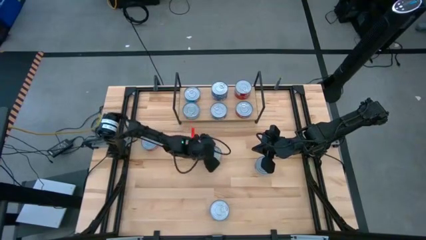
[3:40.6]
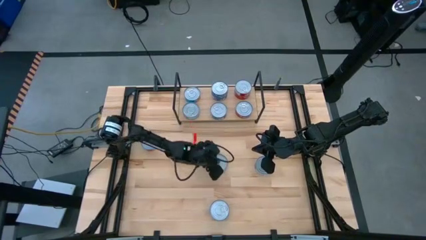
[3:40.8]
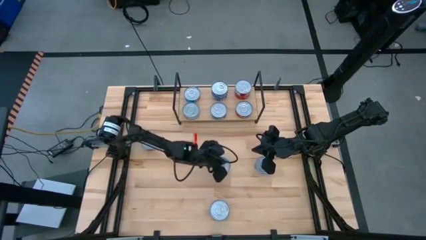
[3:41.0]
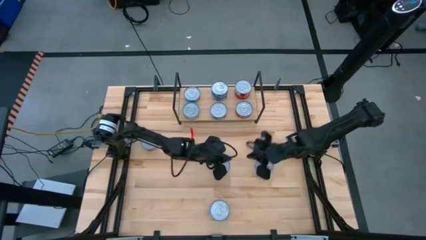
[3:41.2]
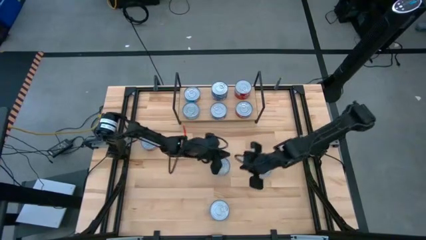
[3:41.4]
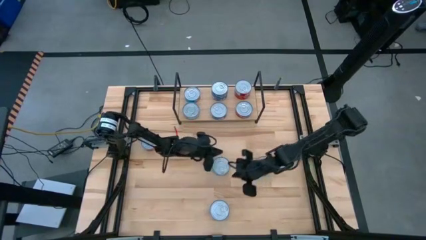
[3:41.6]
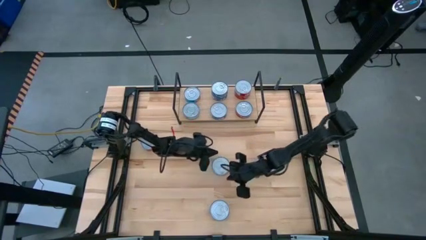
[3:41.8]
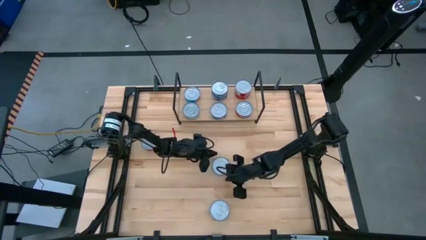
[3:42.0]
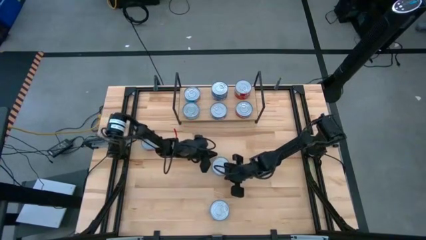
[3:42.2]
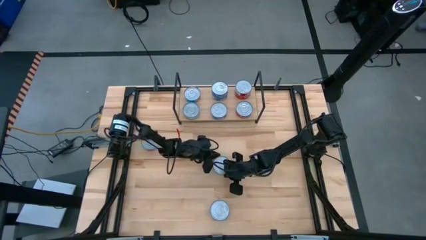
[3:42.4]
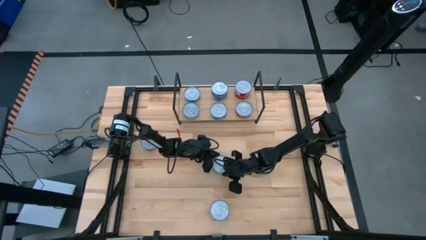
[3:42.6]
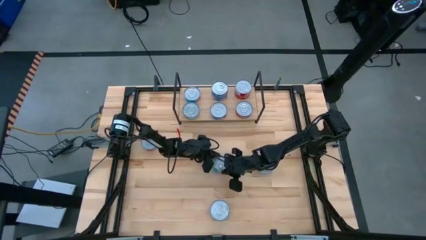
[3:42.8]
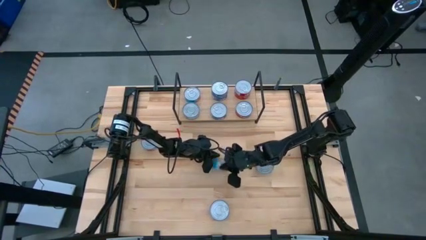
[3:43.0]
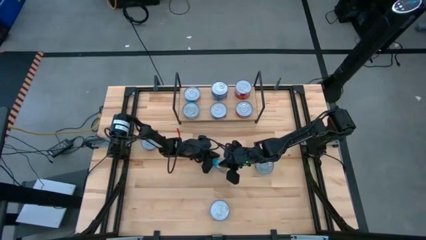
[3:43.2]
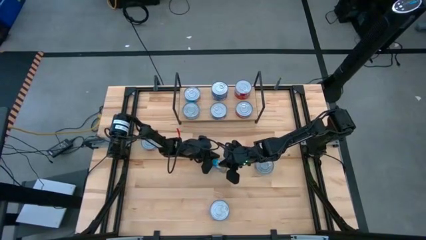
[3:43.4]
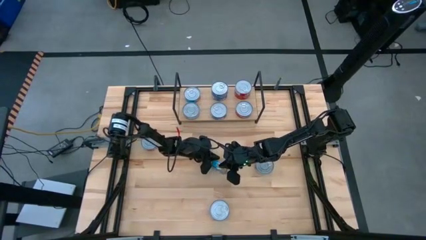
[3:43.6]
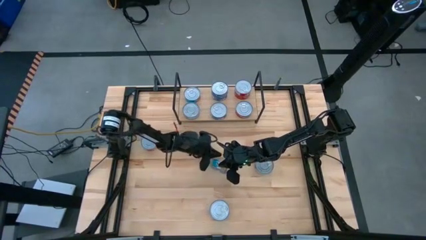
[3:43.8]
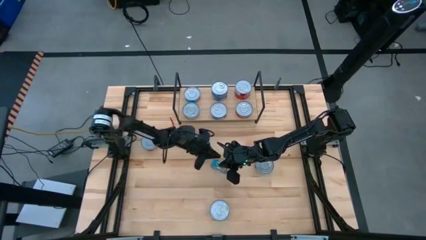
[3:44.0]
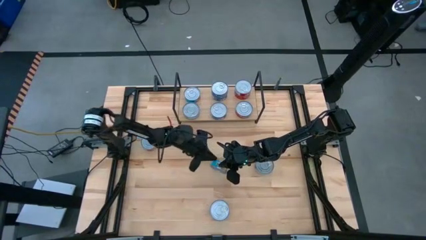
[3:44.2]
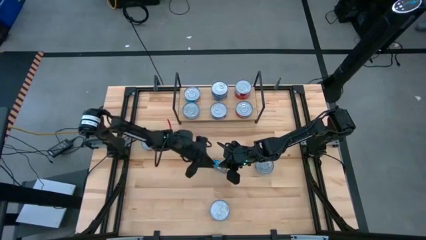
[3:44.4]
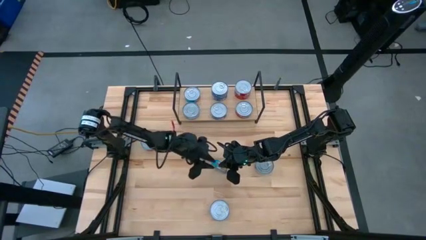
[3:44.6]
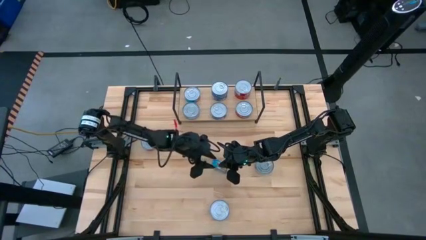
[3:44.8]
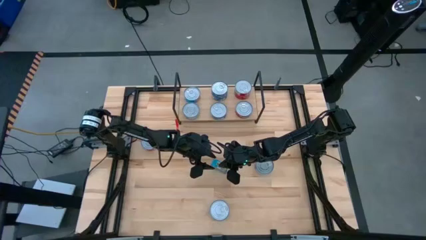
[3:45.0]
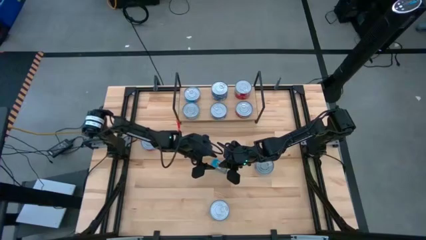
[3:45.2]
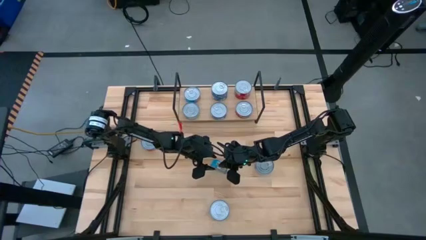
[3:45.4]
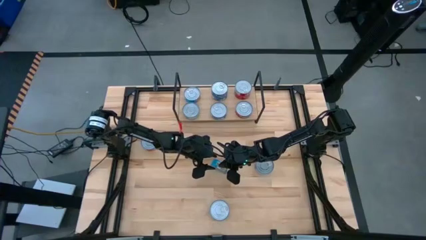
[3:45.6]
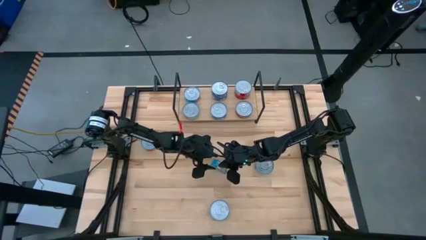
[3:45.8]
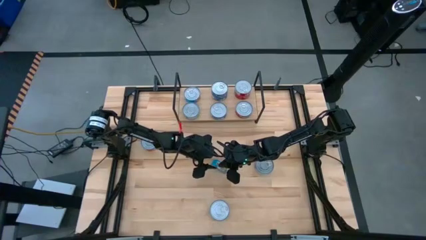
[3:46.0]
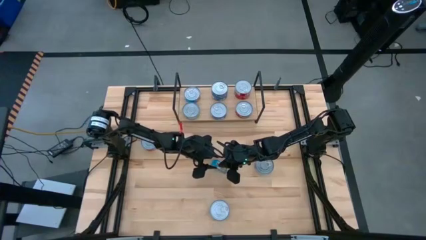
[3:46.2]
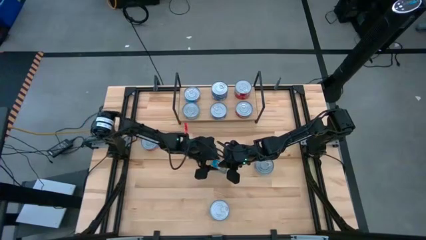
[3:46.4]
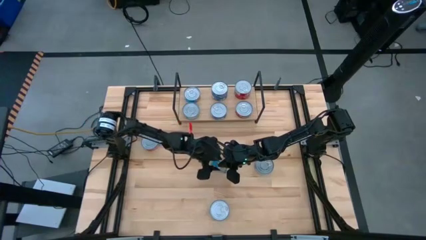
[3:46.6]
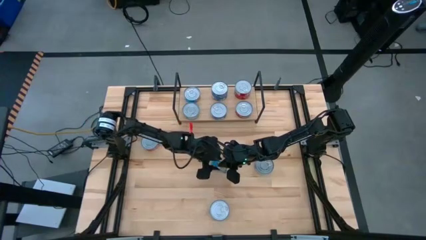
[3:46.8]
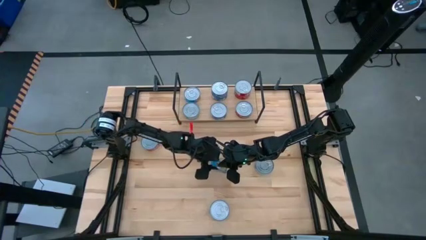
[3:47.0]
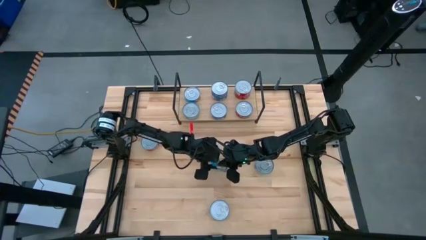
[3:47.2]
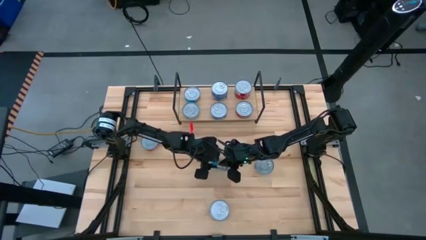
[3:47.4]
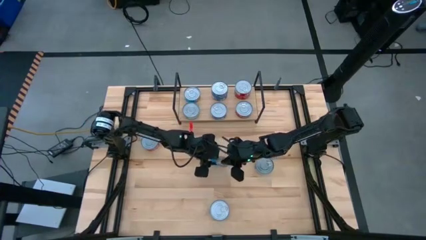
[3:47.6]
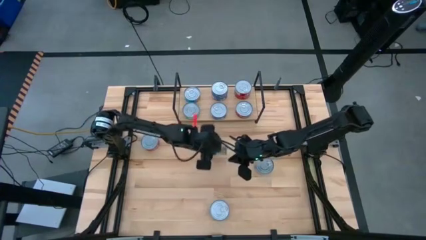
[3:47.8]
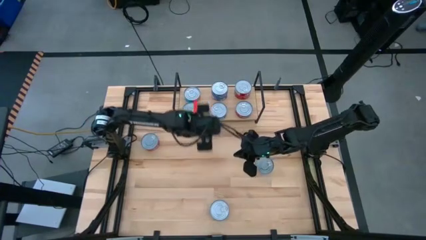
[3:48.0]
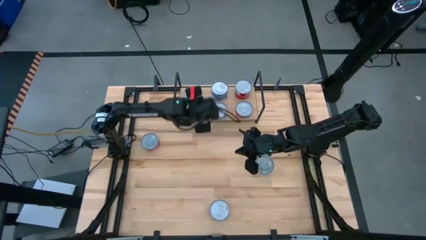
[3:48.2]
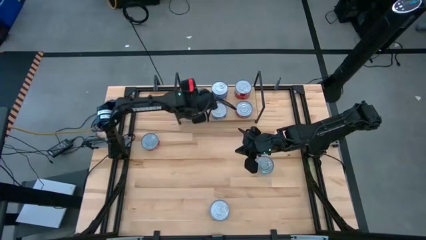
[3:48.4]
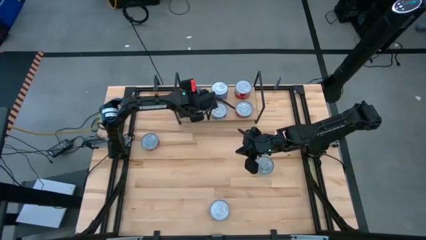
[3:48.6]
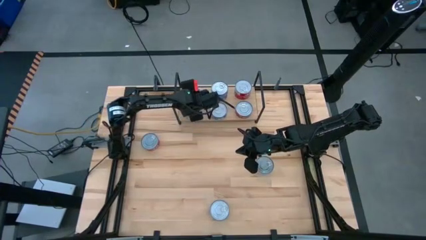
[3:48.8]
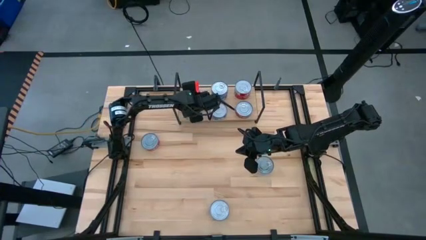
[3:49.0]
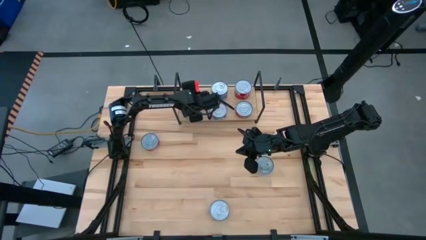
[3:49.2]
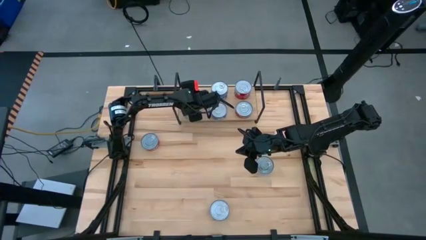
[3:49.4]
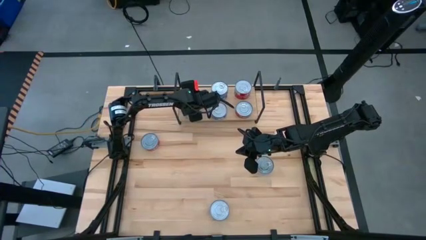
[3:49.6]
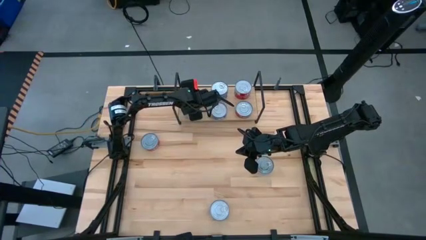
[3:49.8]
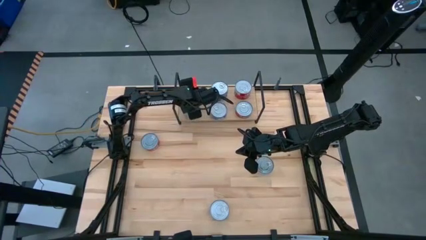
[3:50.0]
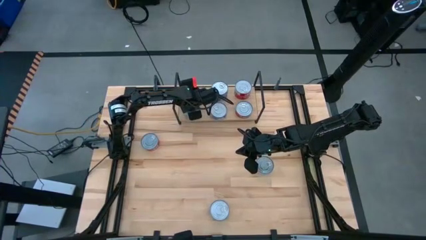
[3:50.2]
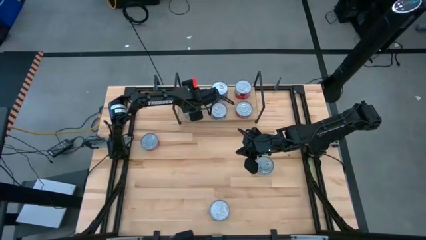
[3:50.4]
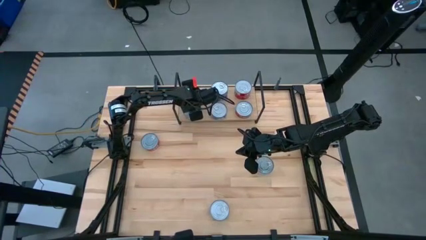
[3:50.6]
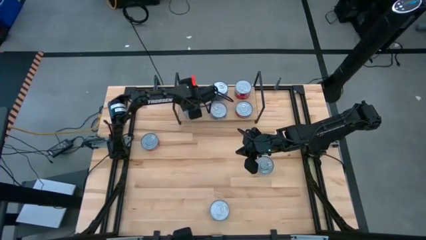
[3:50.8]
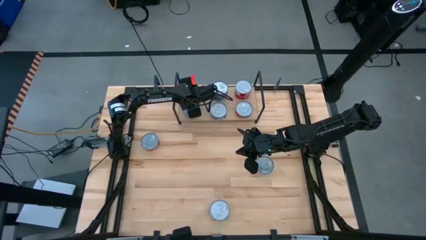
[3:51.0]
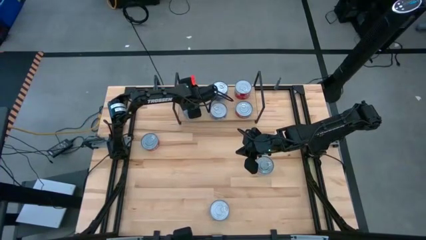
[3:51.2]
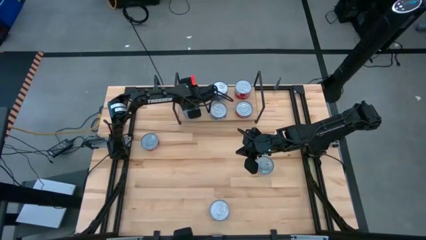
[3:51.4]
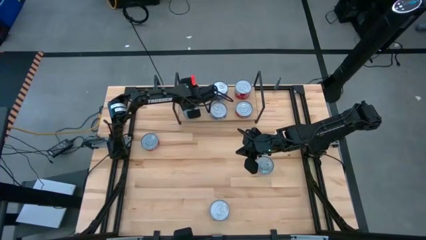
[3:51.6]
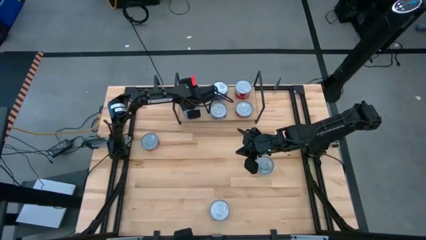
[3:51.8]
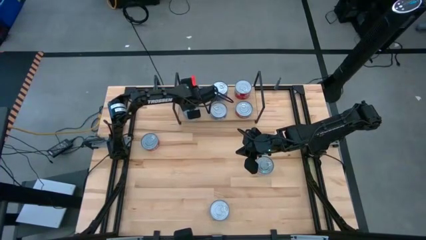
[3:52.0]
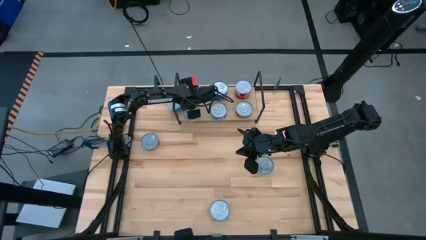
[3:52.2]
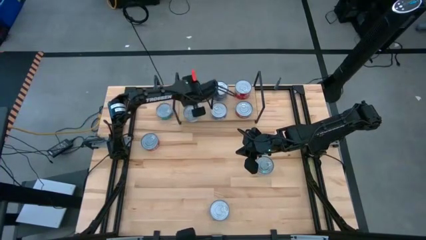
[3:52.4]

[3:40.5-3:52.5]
Task: Stack canned seafood by type on shelf
Stack the center light blue tuna can on top of the other light blue tuna can on the shelf

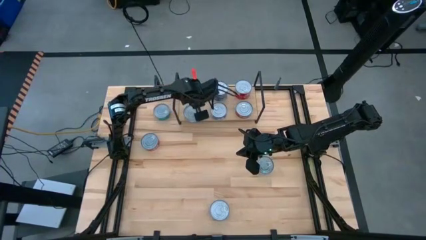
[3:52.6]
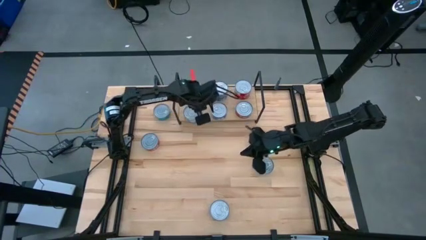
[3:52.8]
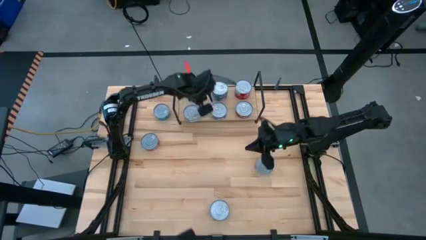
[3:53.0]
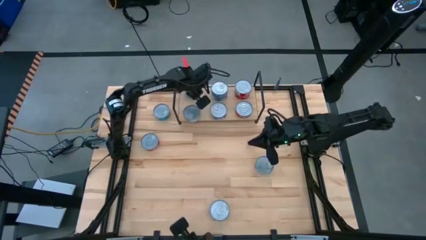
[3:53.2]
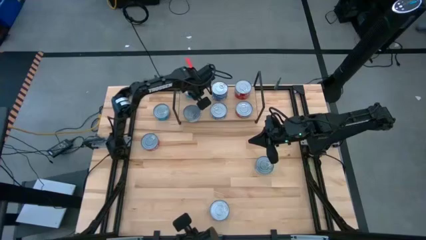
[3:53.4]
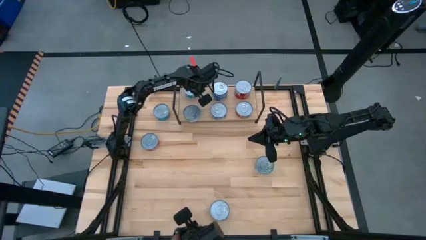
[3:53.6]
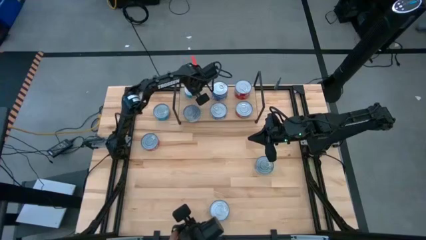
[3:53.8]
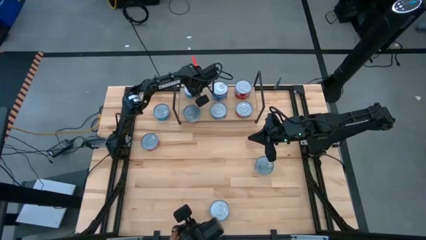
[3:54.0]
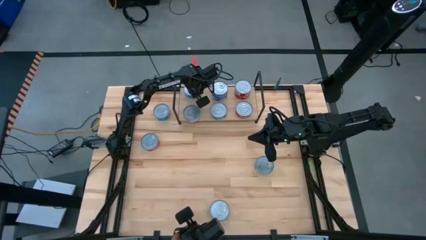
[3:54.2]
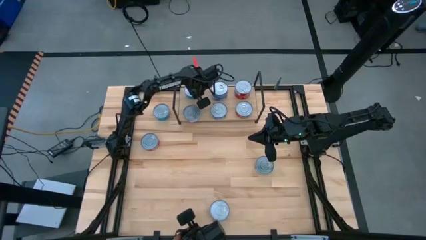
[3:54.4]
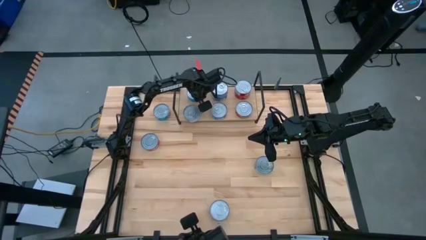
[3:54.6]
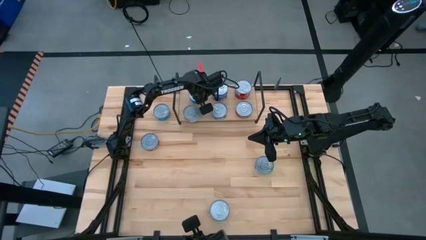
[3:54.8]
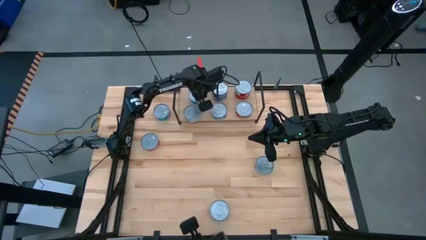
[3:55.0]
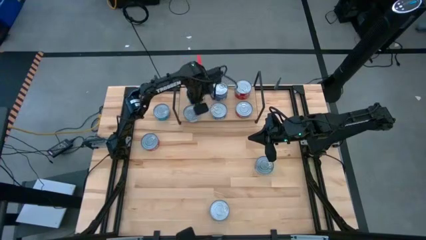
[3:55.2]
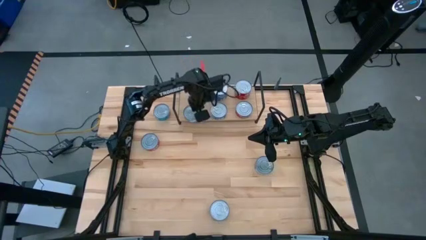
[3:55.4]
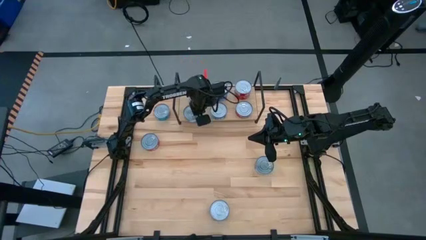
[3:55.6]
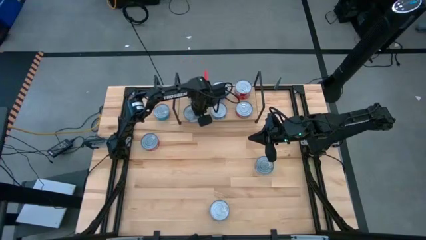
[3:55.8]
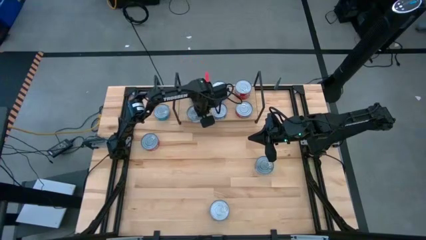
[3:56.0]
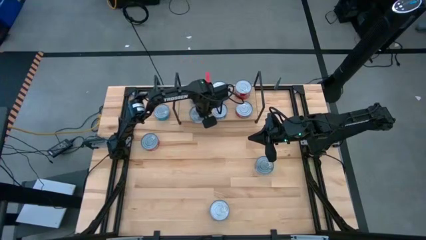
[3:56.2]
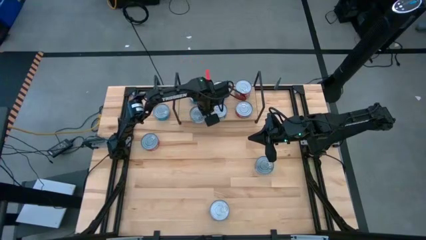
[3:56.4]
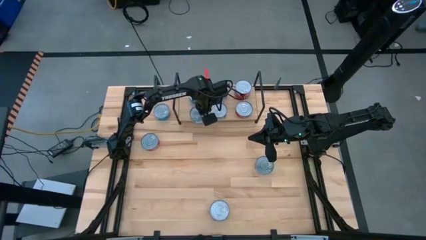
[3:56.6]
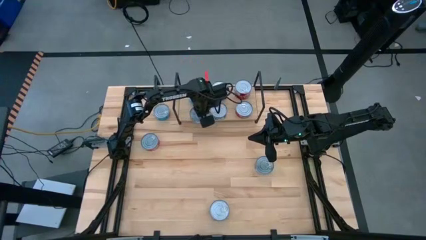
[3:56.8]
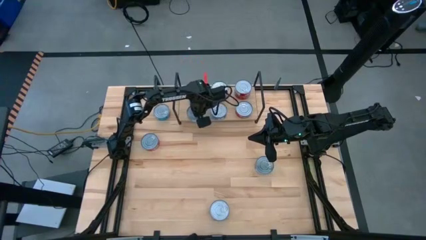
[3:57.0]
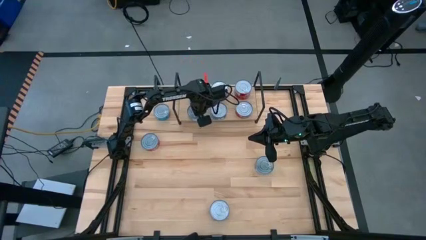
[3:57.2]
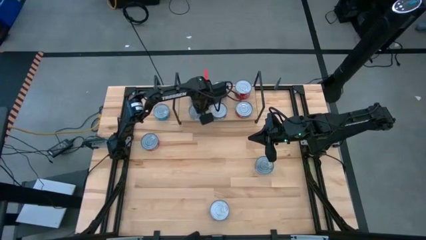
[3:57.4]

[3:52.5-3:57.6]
Adjust the light blue tuna can on the shelf
